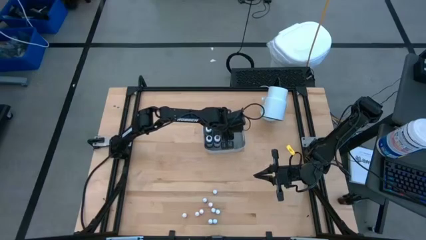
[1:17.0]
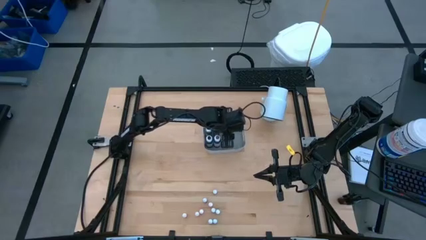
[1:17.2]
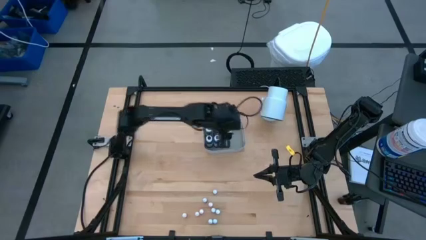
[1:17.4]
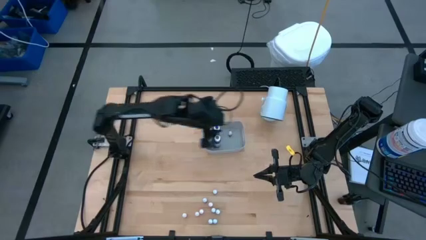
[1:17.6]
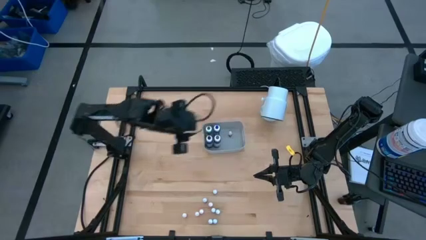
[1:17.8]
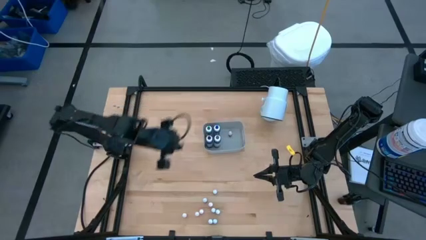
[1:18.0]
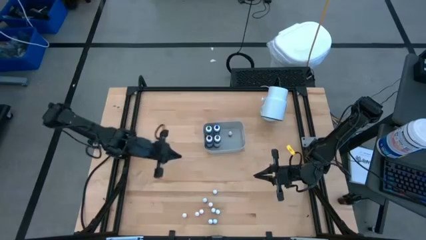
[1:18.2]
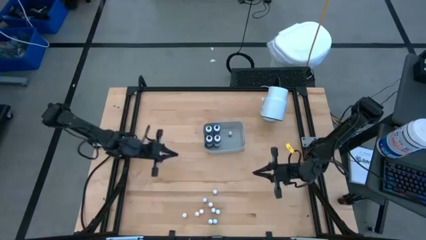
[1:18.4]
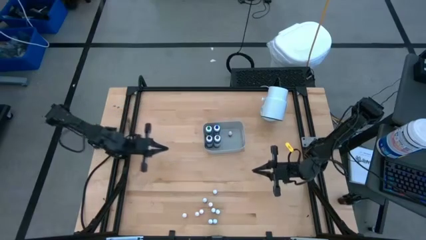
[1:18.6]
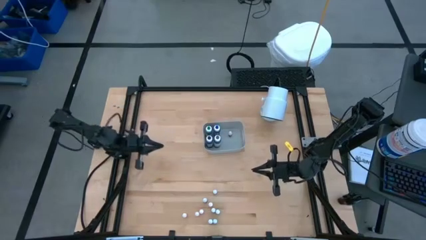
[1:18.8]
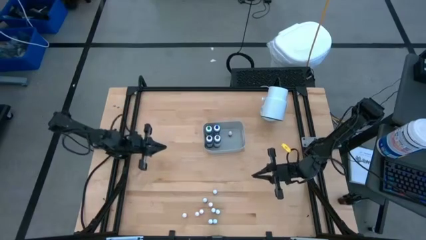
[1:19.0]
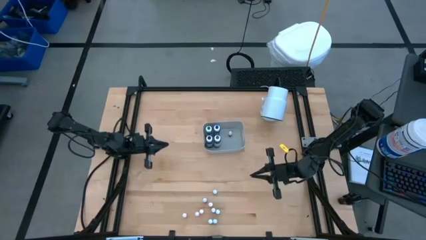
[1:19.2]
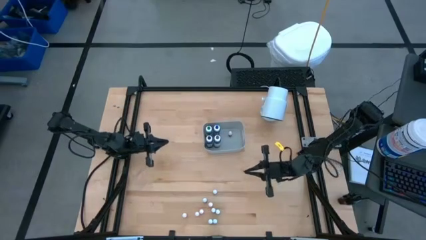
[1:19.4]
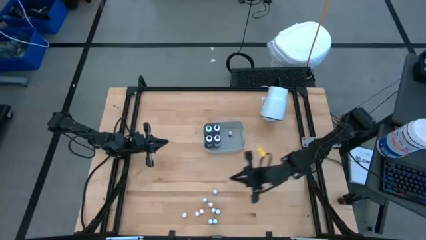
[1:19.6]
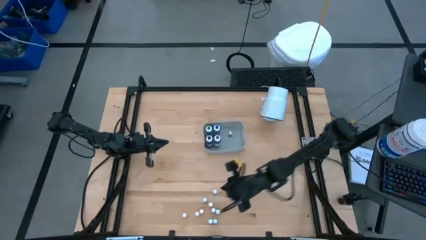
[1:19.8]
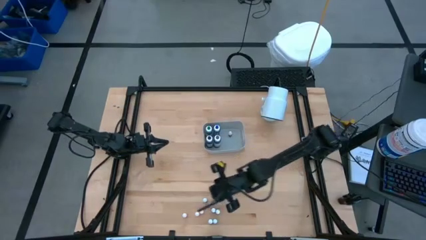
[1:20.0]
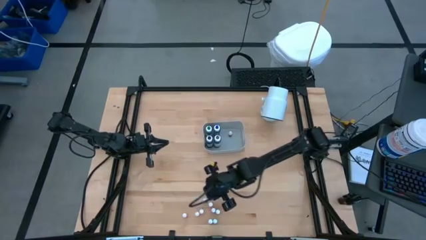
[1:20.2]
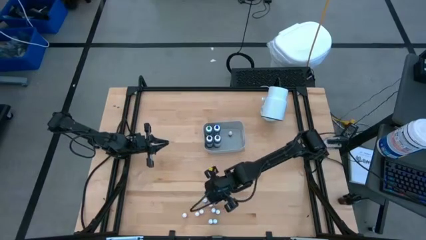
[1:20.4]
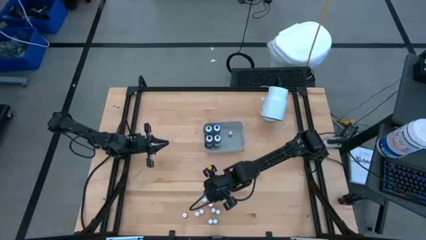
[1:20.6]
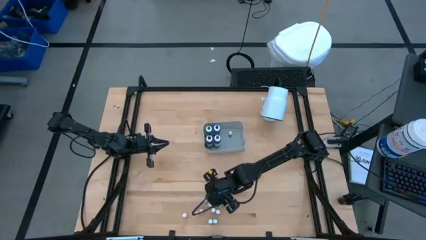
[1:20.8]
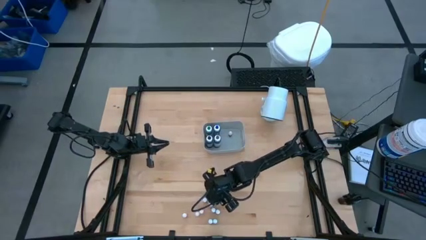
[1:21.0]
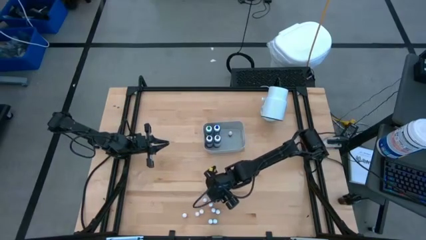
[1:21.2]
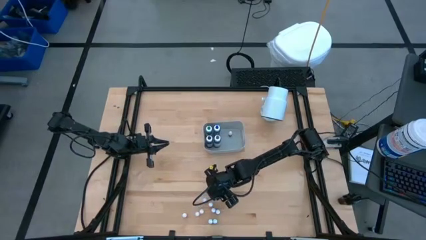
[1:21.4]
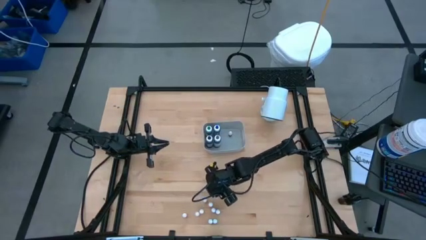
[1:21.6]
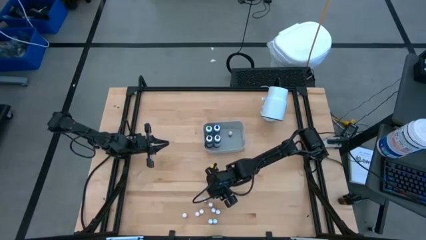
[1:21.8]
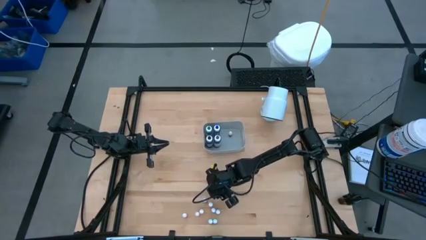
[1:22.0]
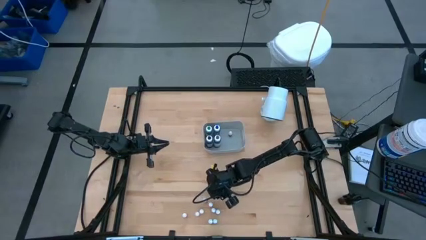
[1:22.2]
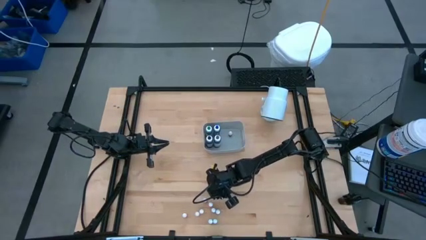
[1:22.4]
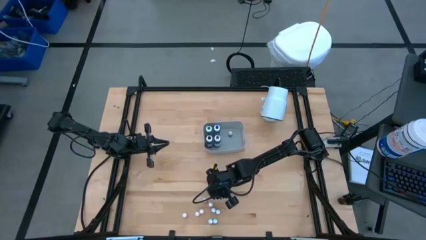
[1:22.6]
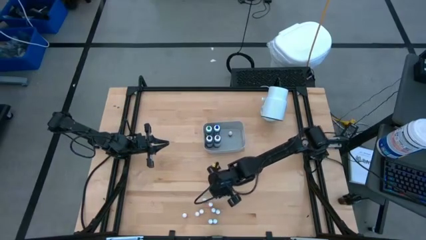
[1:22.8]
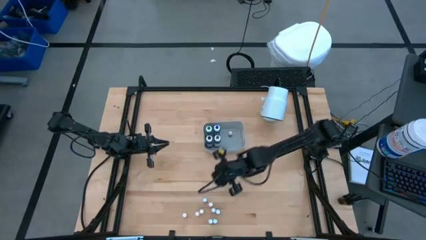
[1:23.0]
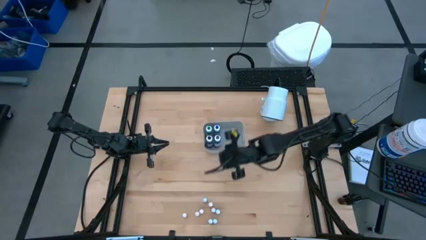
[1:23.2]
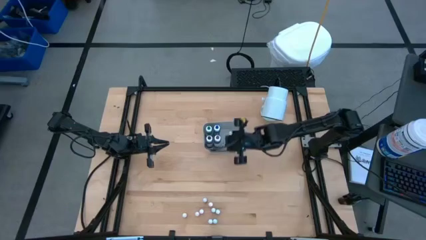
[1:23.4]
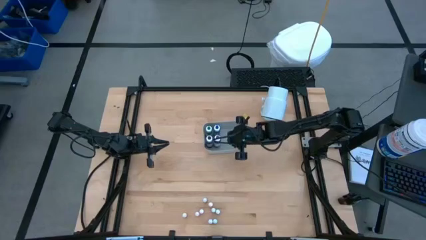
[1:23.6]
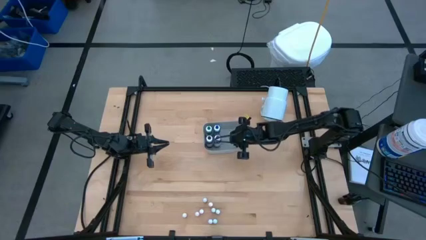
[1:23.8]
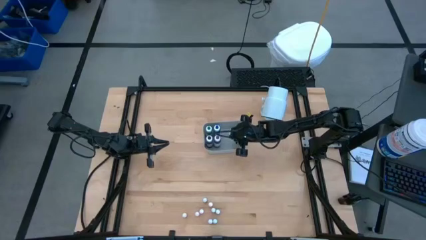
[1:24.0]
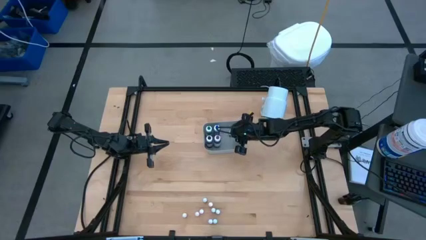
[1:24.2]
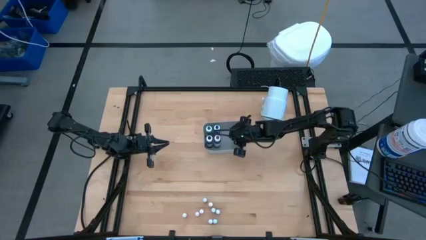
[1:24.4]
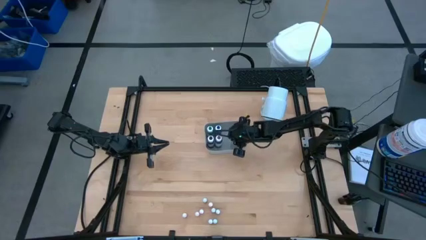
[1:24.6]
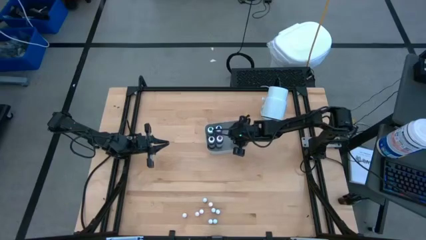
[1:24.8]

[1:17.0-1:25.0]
Task: Pick & Place food coloring
Put the small blue food coloring bottle into the top bin

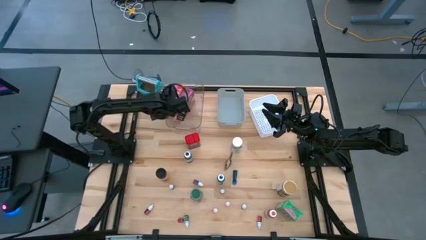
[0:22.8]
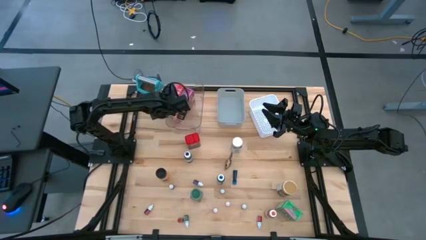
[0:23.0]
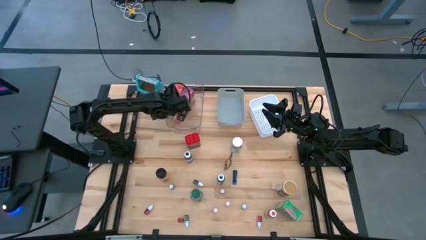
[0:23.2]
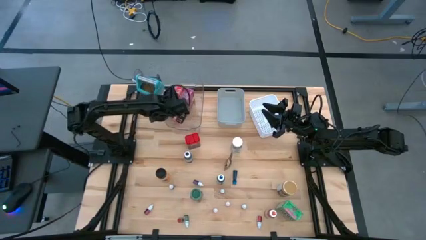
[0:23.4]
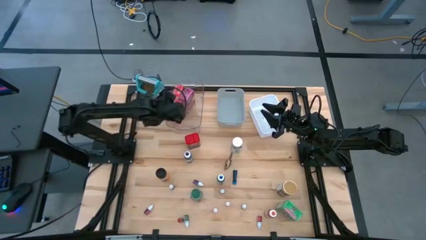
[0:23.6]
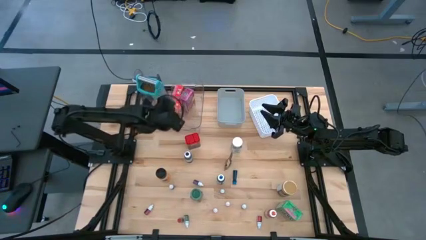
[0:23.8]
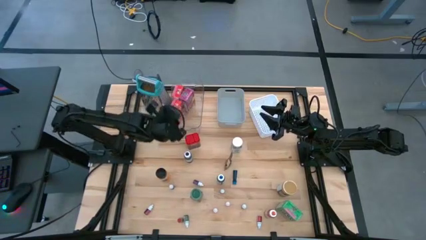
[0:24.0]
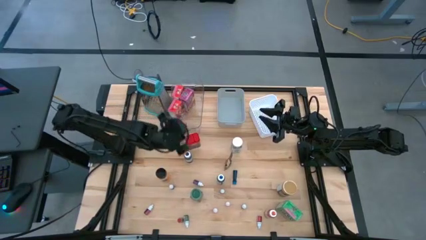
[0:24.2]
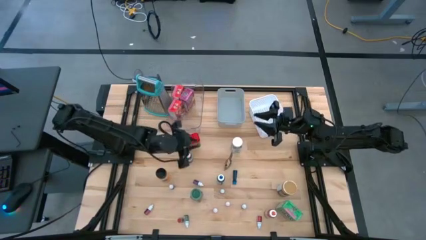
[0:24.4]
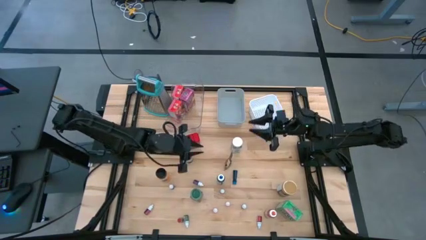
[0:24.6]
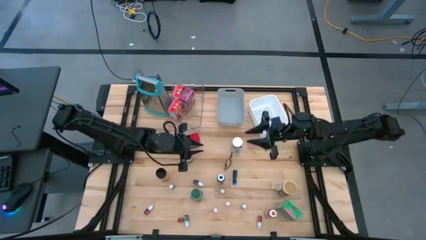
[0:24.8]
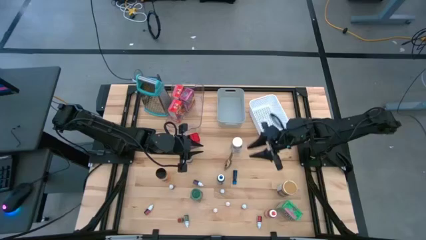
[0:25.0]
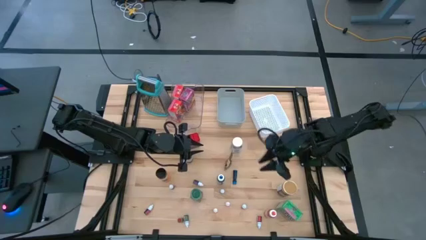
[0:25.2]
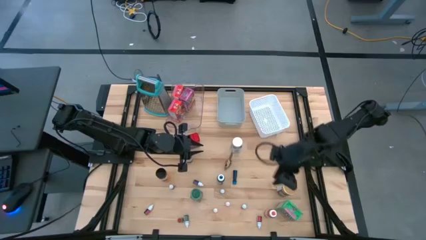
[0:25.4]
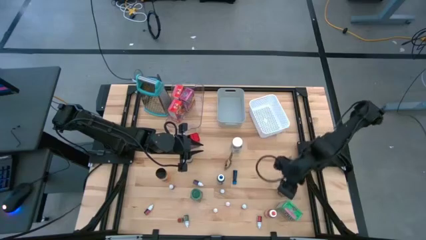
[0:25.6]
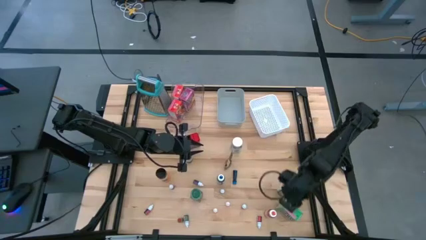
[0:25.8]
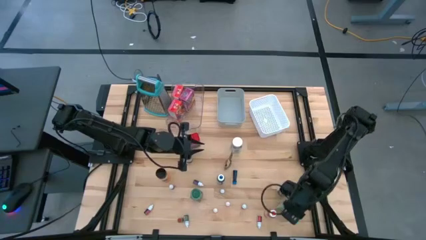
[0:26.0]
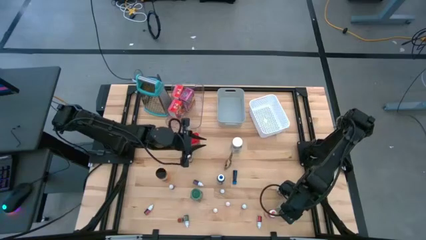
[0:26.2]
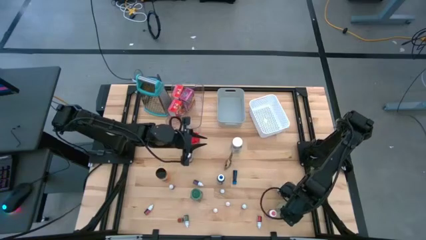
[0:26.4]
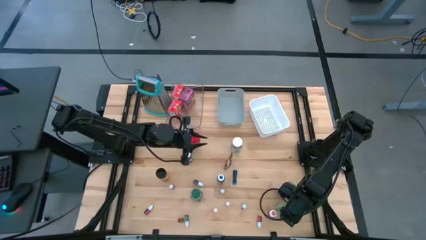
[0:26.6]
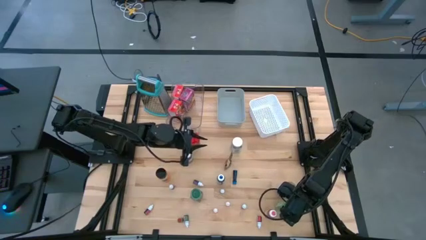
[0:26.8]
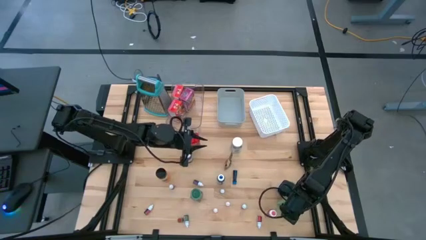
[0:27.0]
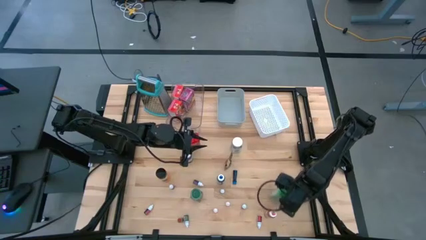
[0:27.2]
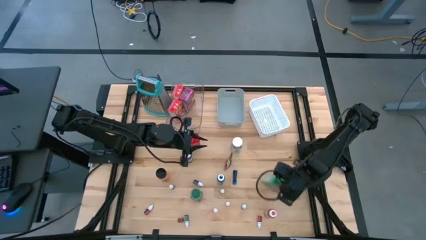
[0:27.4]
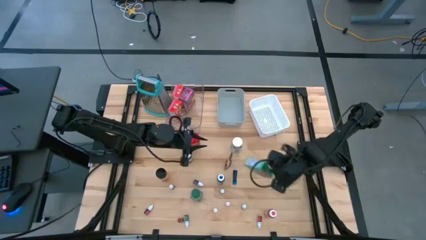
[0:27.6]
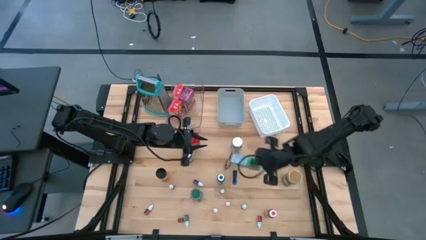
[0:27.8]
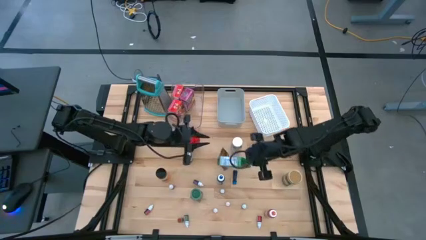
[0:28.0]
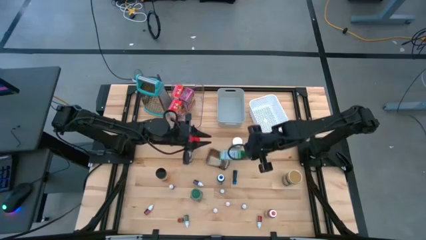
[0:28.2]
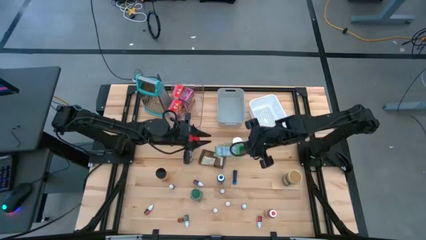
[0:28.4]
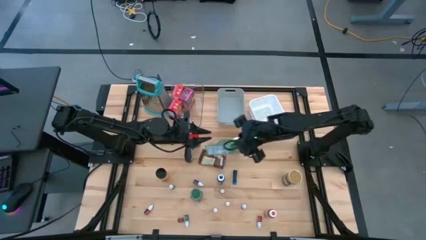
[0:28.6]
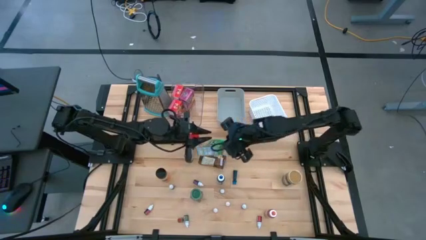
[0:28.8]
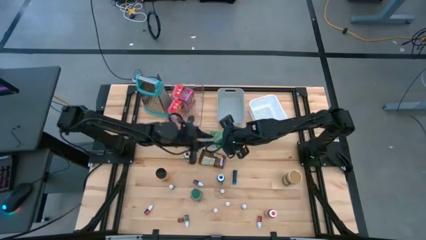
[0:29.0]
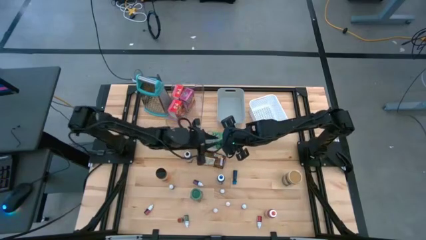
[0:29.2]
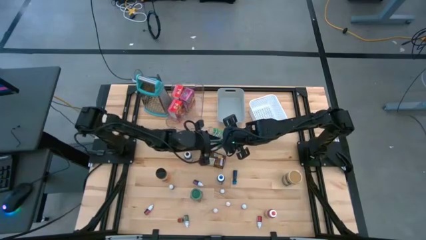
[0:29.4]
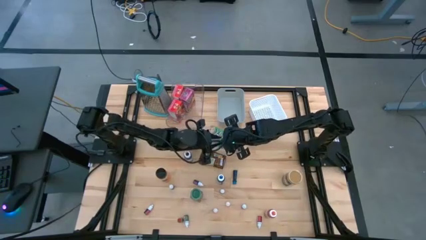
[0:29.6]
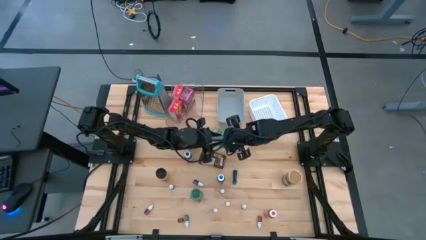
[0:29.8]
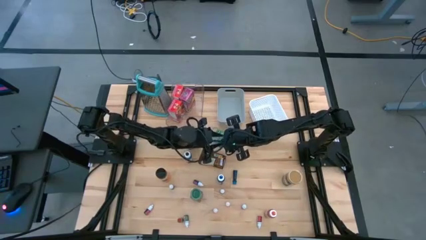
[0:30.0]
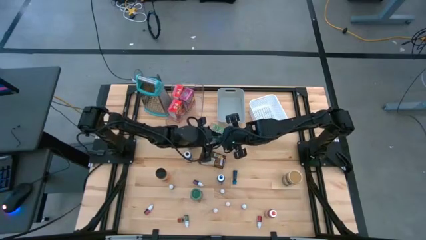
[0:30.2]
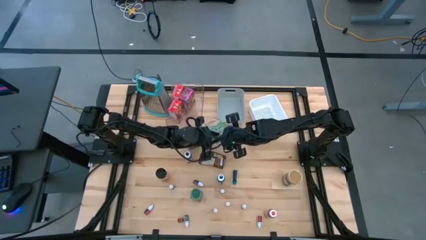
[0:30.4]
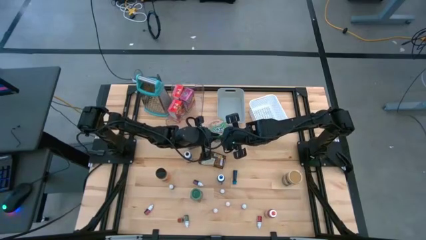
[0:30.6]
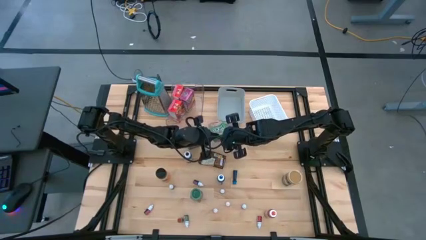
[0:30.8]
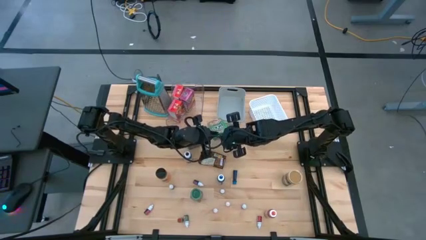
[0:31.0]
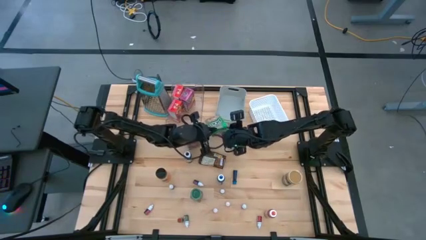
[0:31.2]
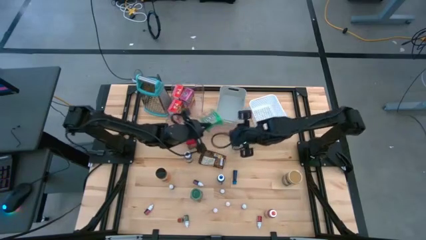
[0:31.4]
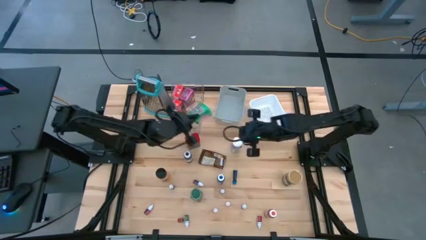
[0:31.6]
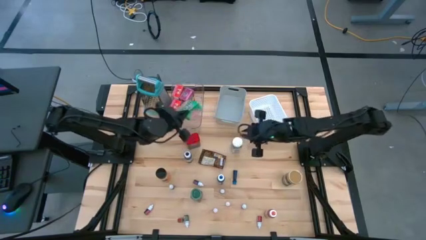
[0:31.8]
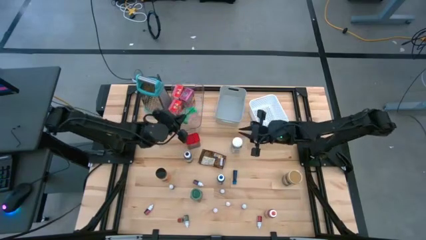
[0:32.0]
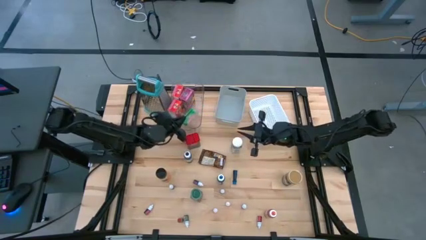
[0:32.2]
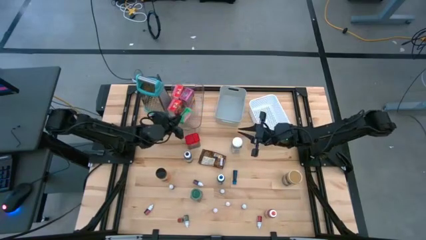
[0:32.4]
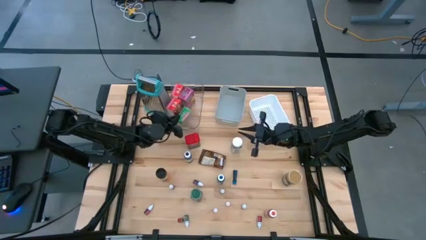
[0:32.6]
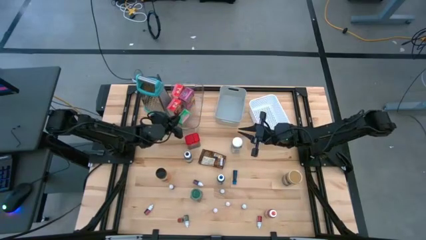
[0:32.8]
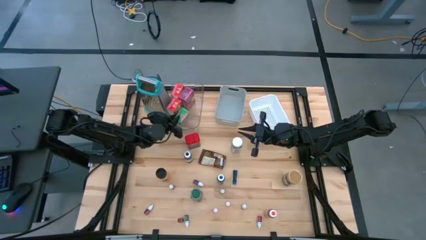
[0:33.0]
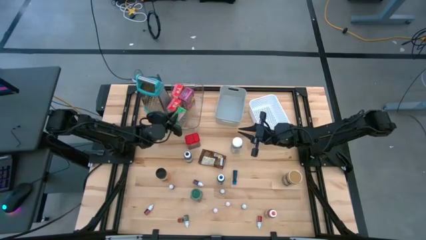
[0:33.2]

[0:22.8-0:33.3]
Task: Pick & Place Kitchen Items
Put the green cereal box into the transparent bin
